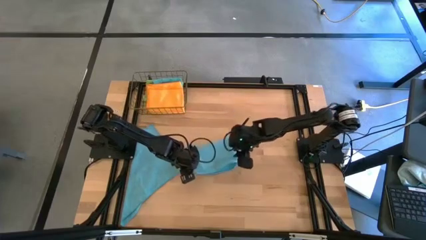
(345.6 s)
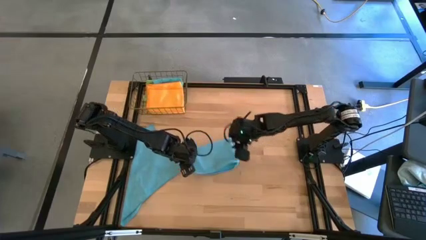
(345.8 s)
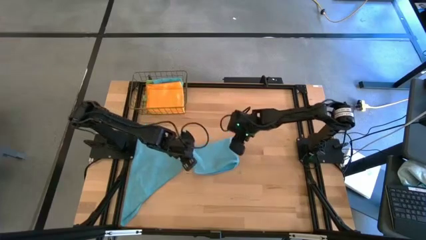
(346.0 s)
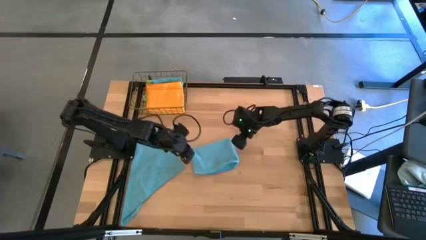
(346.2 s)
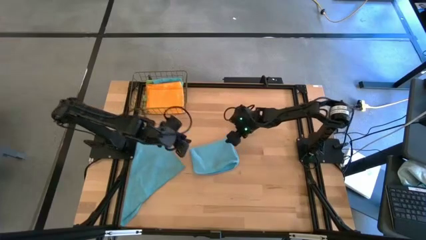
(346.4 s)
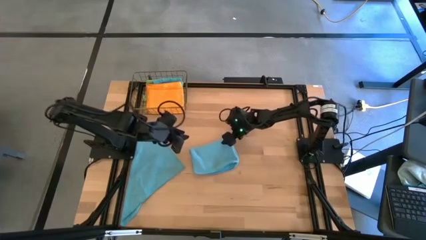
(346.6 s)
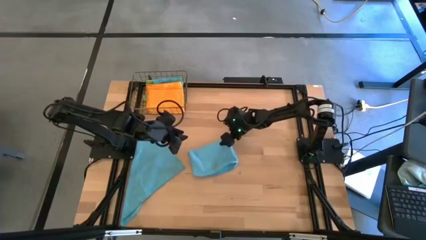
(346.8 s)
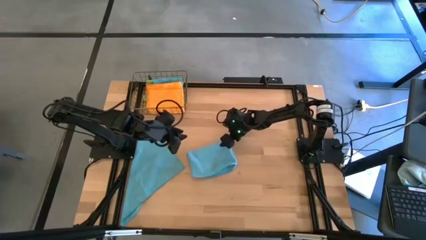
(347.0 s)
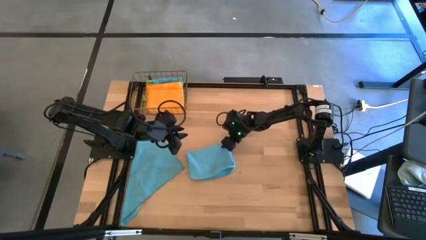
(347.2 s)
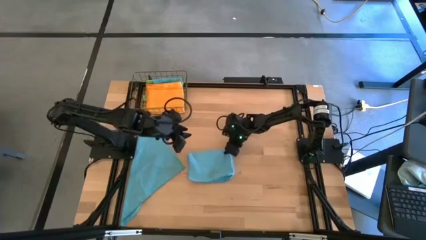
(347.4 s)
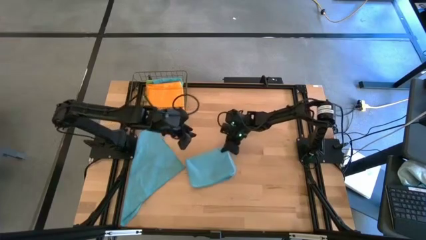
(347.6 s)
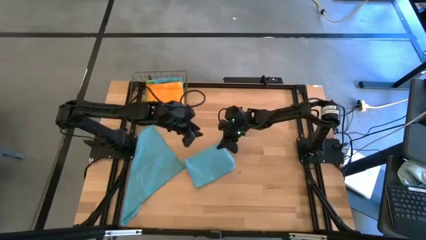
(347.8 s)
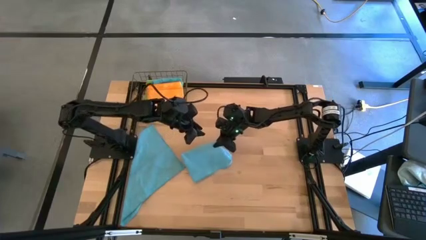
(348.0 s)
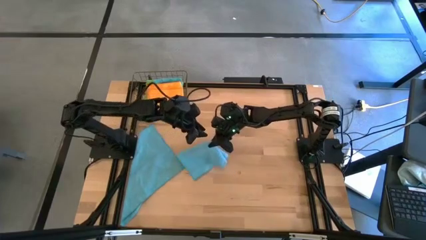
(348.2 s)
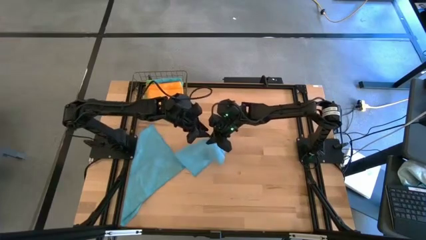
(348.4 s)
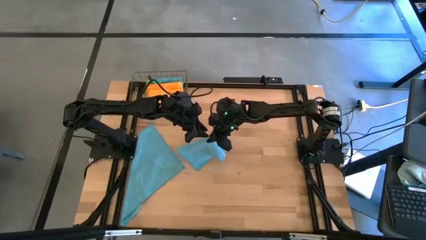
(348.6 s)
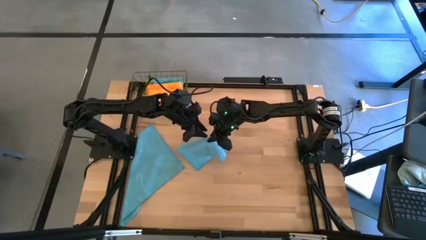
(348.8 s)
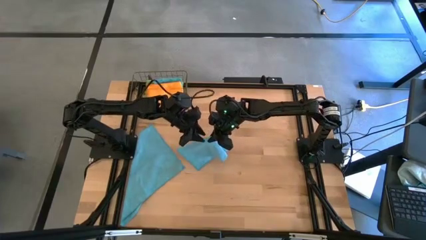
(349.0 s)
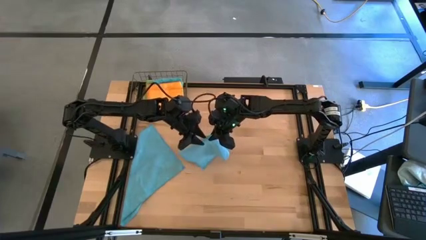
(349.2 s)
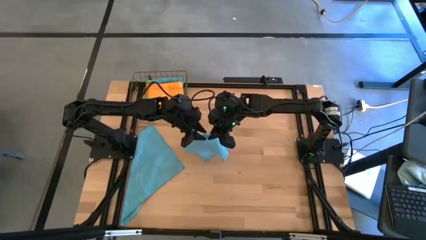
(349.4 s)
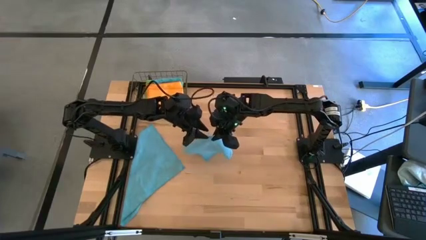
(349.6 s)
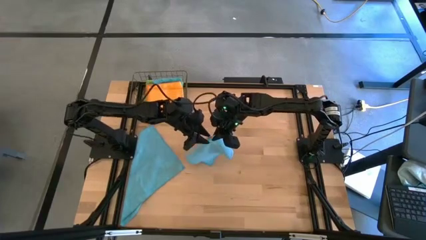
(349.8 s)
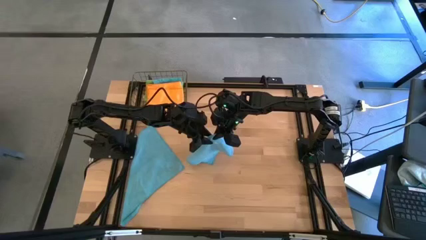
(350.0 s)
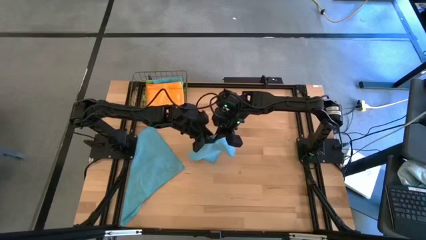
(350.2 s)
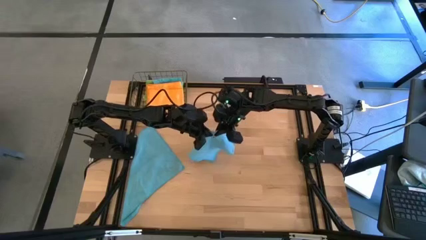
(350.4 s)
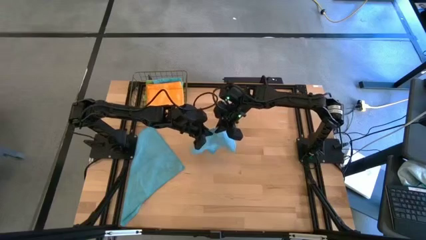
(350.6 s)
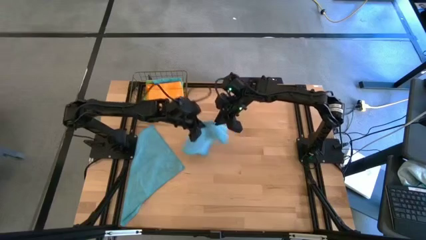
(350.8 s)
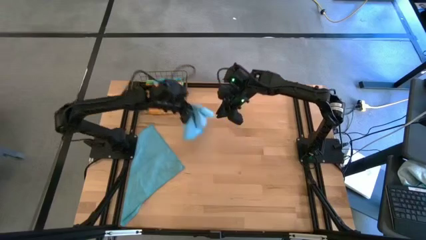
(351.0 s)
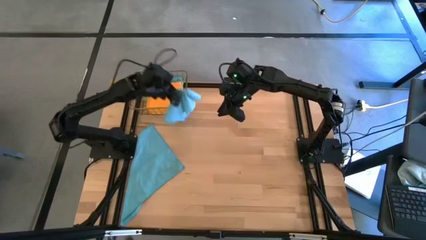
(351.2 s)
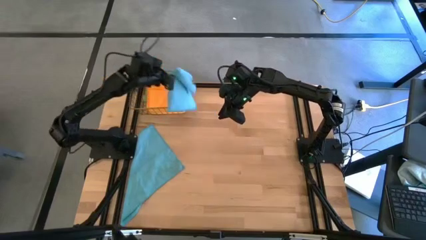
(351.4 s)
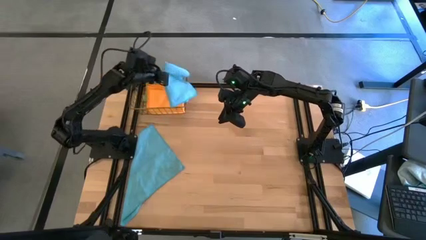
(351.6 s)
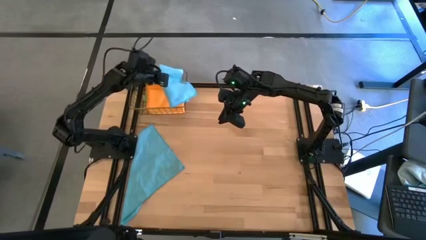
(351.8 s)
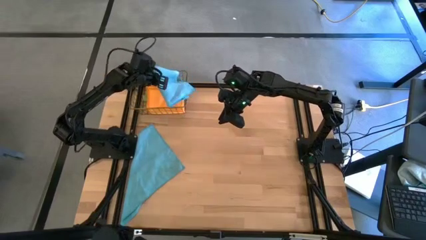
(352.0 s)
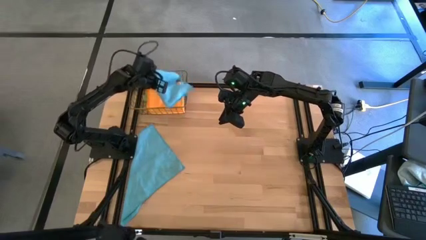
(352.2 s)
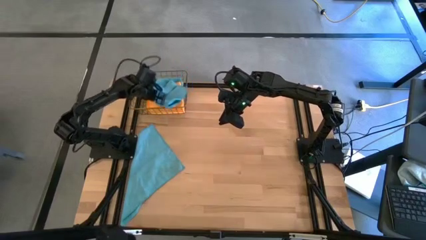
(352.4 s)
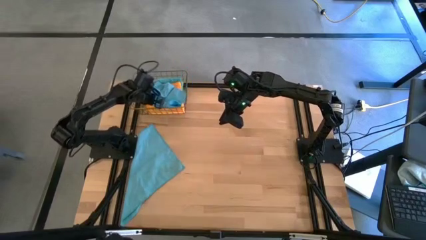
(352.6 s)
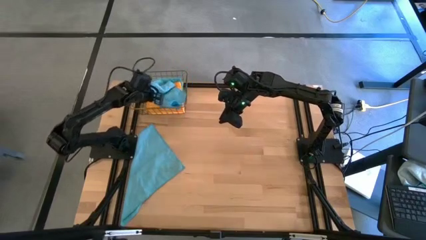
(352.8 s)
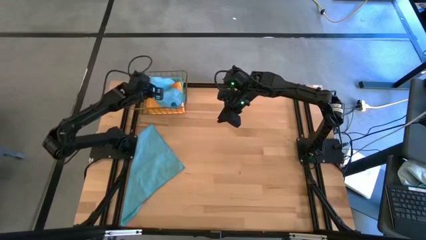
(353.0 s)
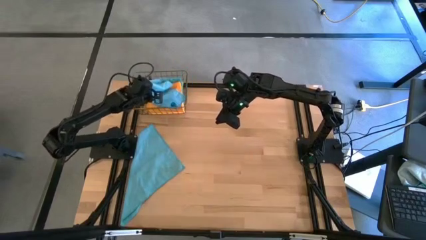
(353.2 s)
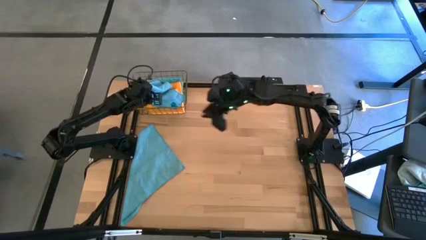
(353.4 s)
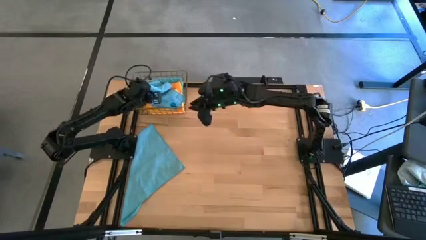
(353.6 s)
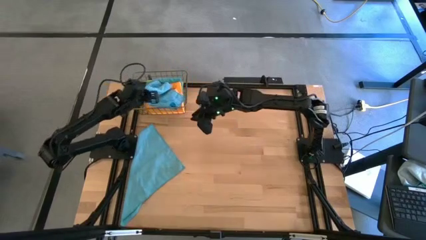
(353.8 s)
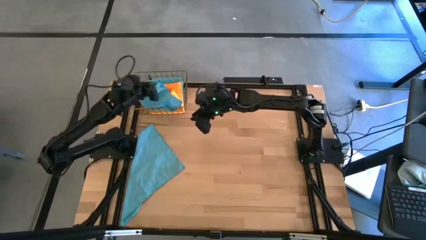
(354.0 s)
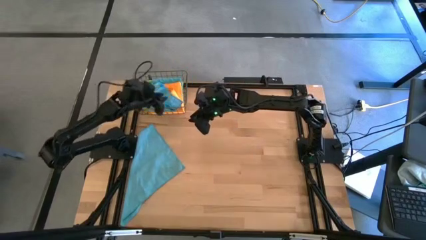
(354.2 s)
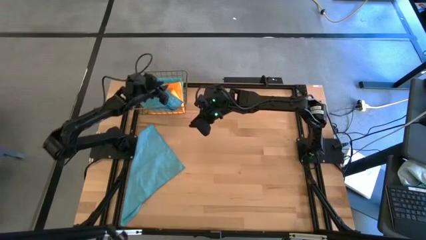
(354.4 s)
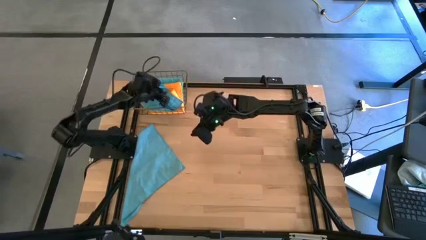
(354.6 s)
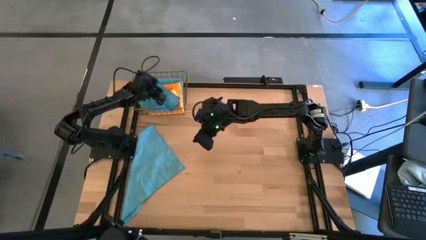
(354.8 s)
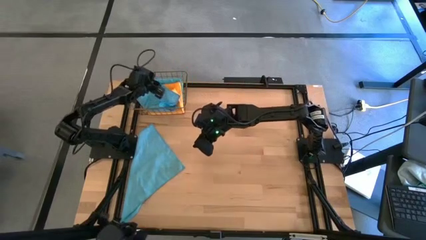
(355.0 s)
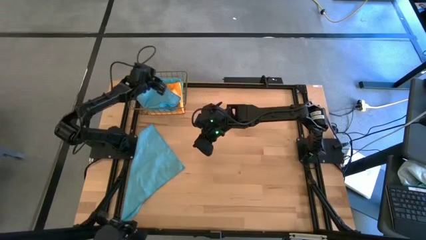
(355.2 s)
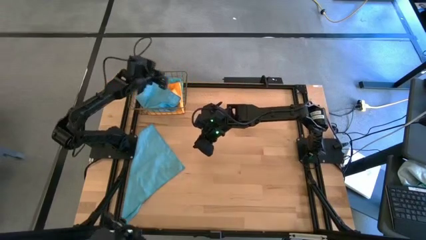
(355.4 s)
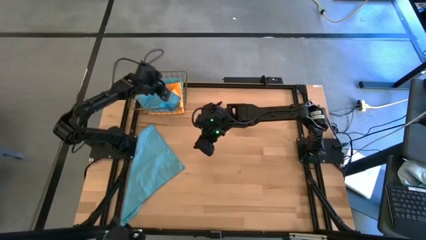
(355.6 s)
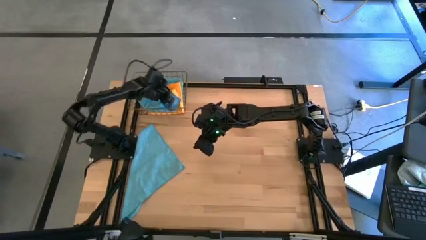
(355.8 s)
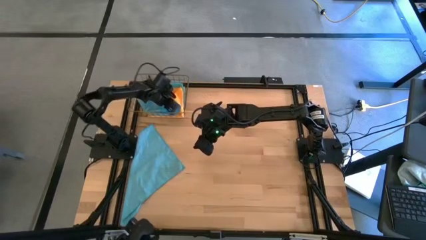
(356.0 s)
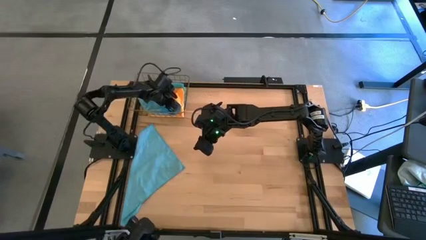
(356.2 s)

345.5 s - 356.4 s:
Task: Fold microfiber towels
Put the folded light blue microfiber cloth into the wire basket

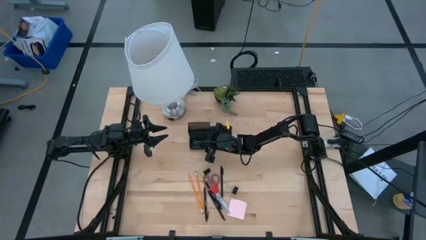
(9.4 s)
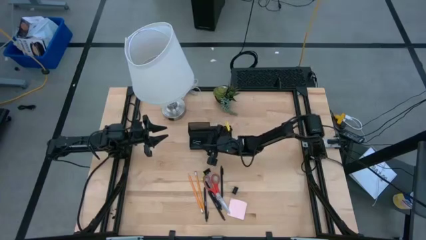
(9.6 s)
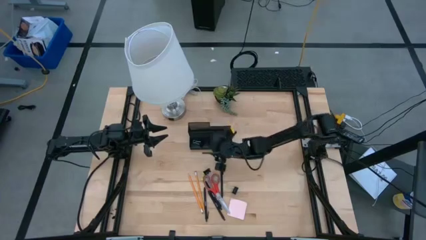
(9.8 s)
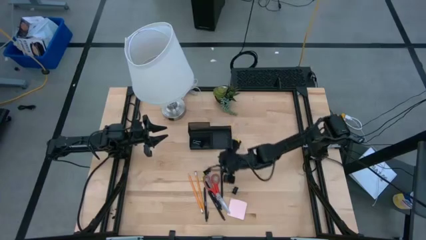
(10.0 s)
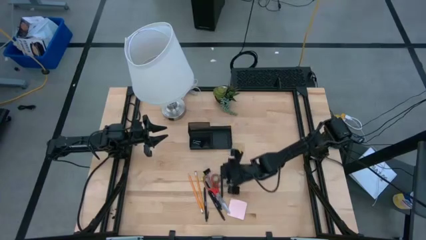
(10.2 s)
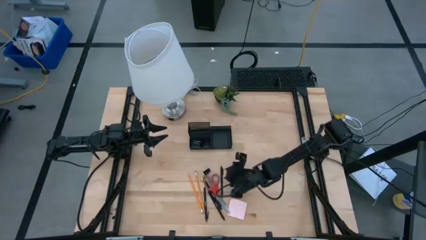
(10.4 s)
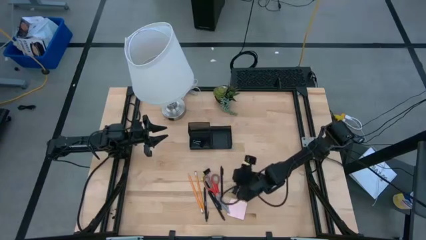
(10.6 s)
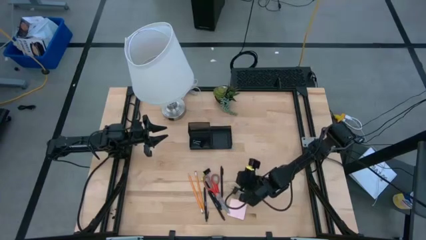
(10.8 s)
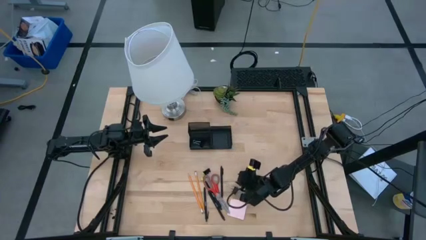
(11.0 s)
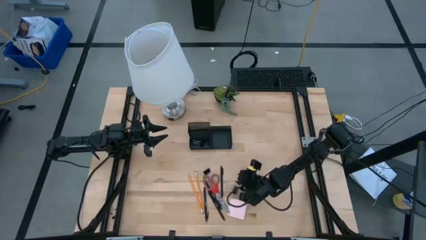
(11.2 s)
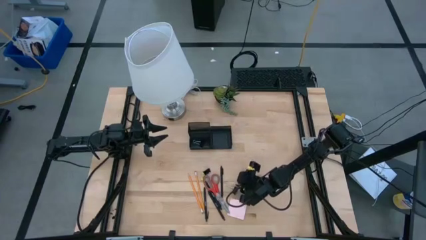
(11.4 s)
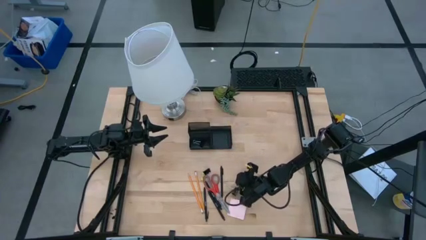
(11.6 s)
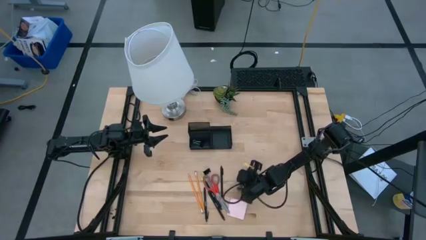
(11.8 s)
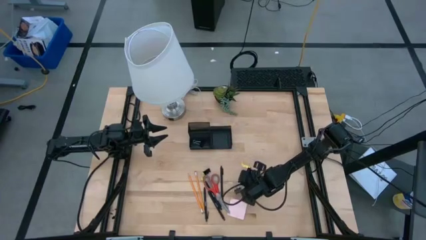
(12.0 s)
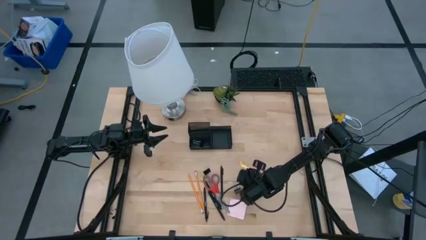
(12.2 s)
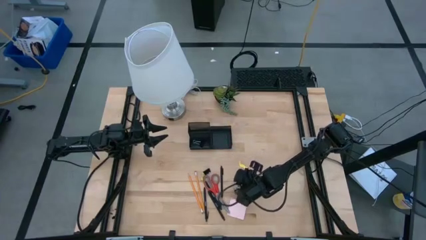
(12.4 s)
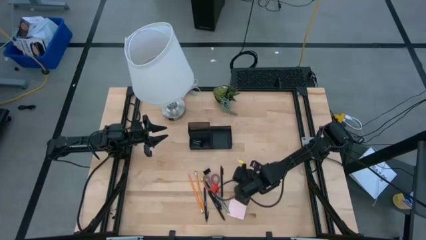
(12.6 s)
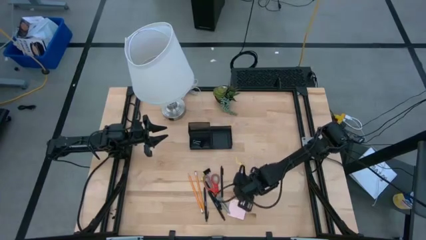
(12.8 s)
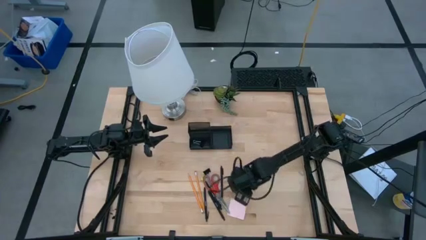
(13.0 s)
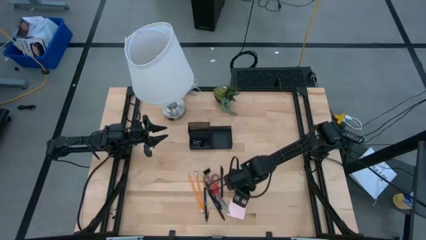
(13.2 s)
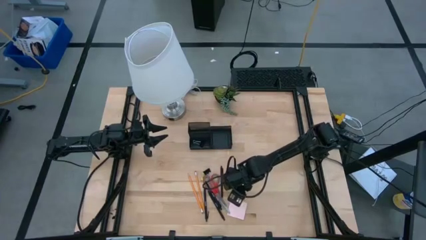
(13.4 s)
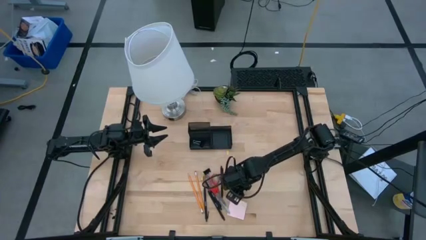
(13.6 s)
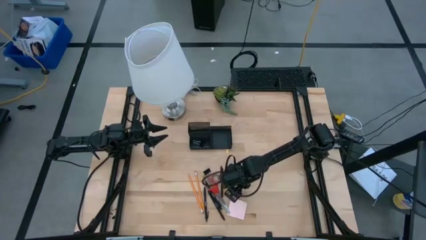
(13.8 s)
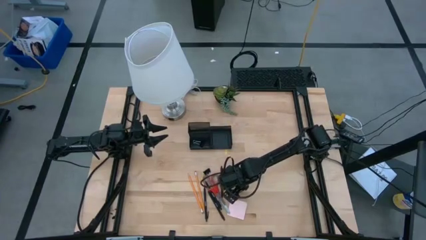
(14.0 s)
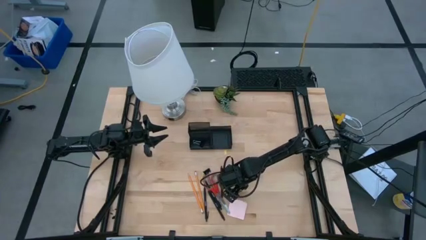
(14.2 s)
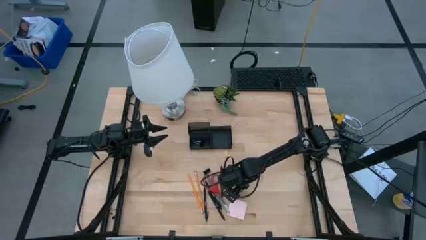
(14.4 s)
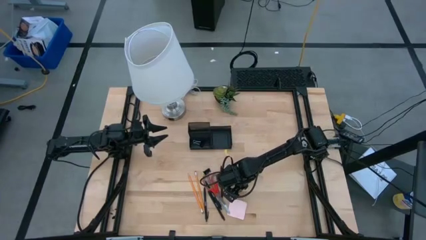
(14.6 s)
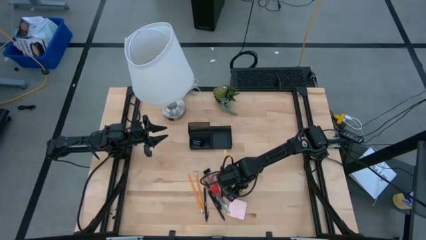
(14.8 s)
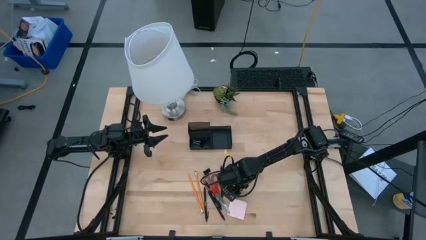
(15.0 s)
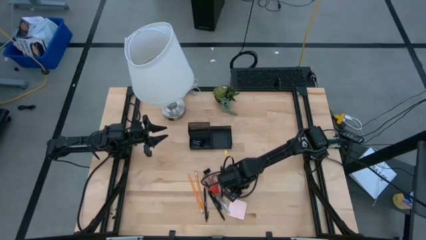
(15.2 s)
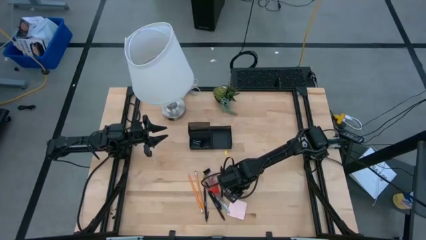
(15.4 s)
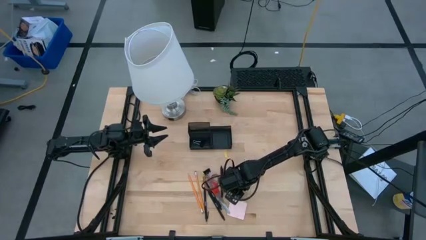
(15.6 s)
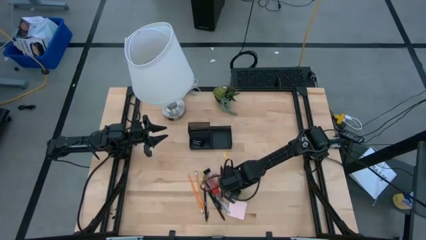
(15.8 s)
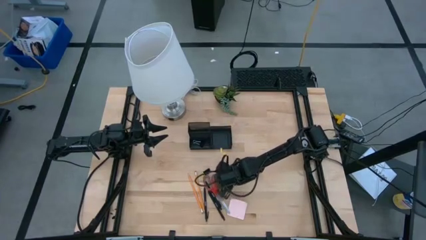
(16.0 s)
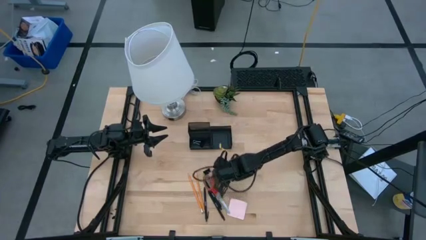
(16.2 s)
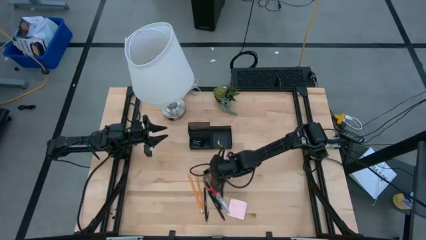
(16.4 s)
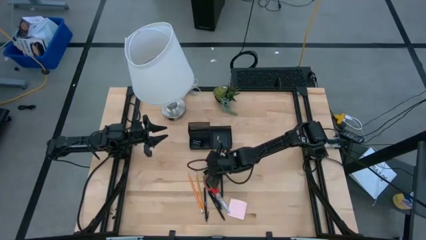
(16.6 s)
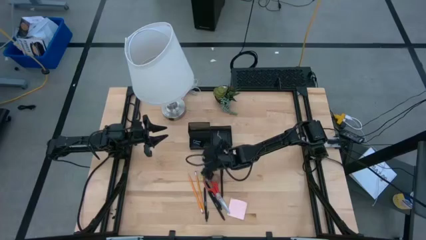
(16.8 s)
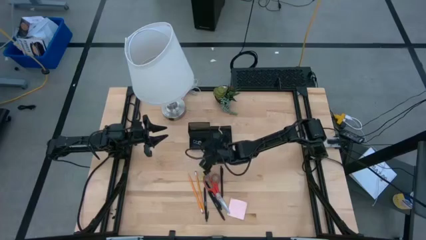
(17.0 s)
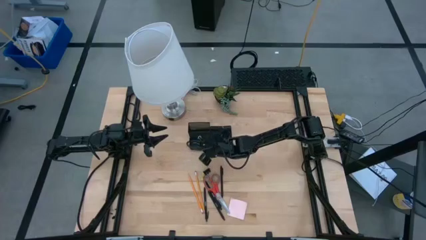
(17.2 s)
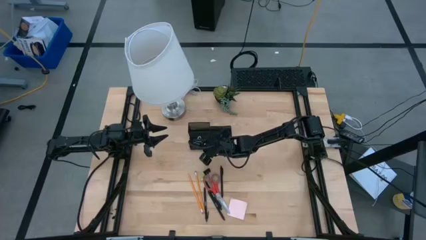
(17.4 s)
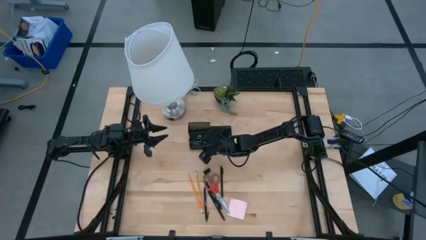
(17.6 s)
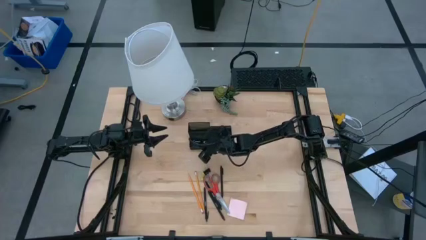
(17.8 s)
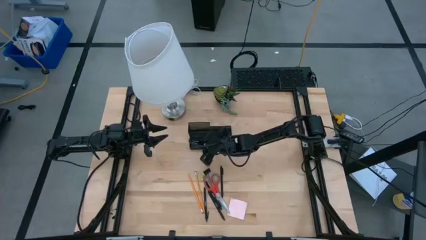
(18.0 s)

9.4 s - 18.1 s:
Task: Pick and place office supplies into organizer
Put the black right binder clip into the black desk organizer
